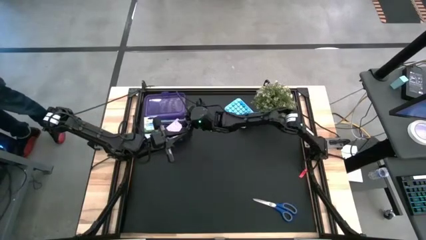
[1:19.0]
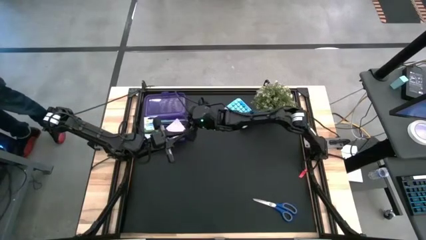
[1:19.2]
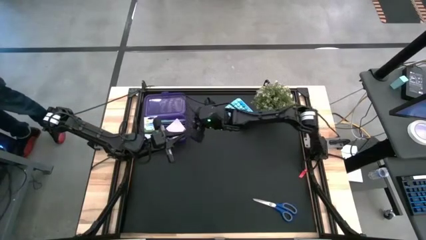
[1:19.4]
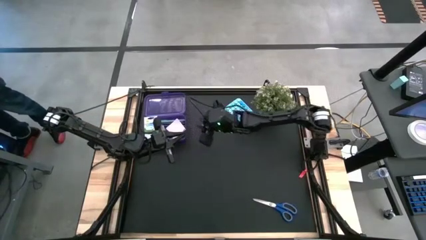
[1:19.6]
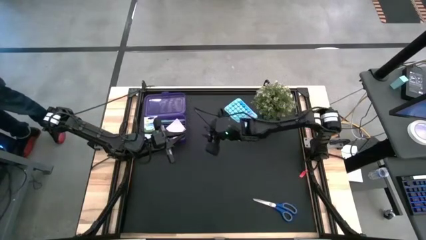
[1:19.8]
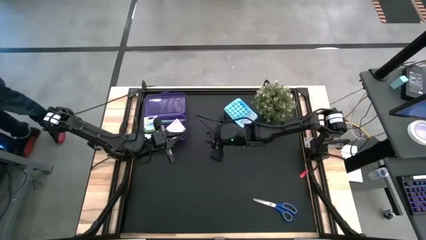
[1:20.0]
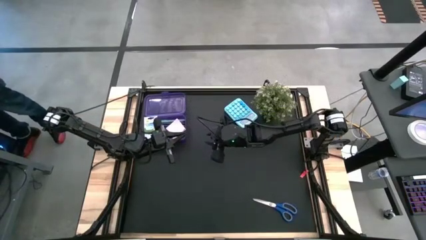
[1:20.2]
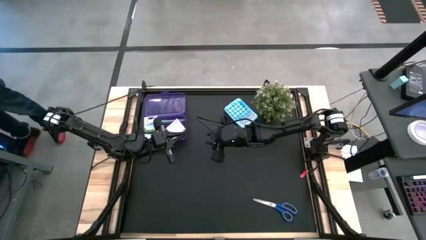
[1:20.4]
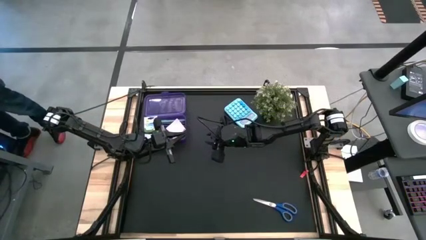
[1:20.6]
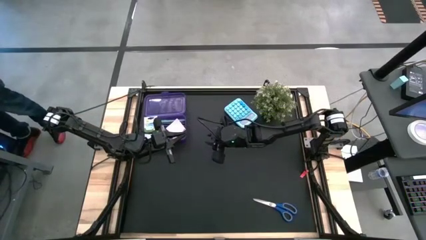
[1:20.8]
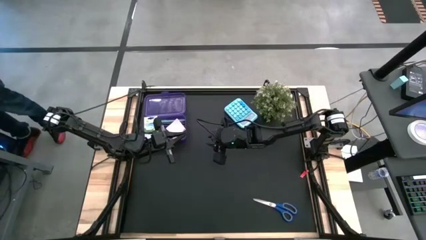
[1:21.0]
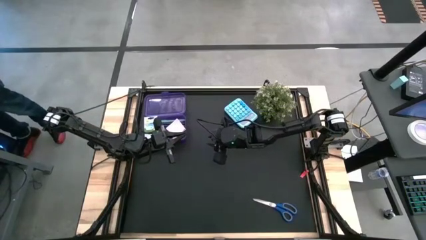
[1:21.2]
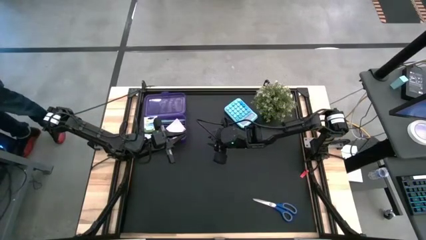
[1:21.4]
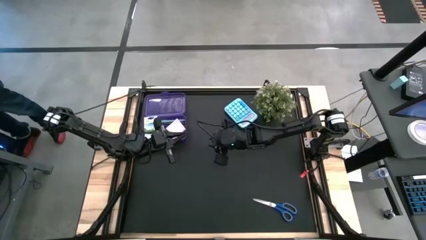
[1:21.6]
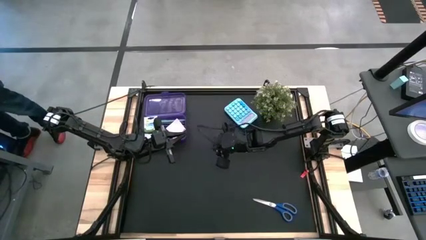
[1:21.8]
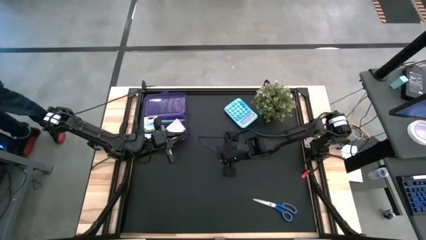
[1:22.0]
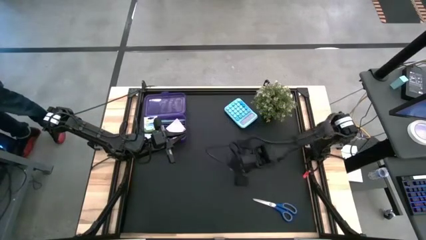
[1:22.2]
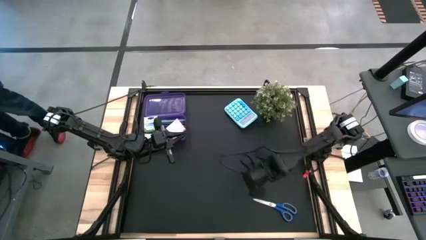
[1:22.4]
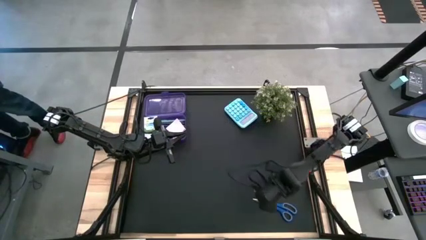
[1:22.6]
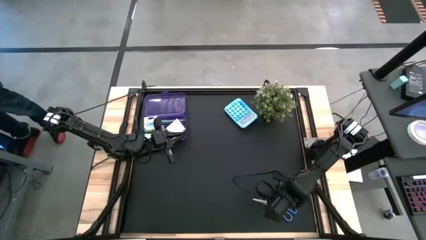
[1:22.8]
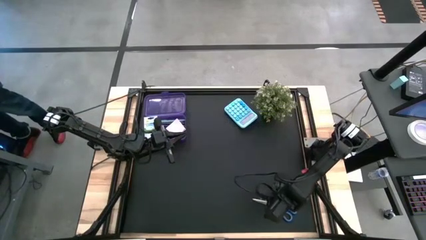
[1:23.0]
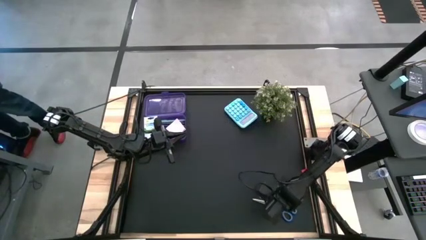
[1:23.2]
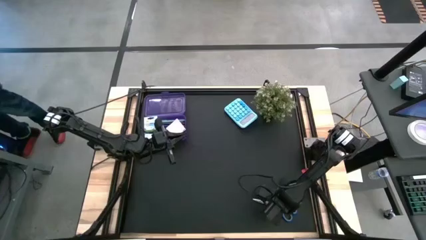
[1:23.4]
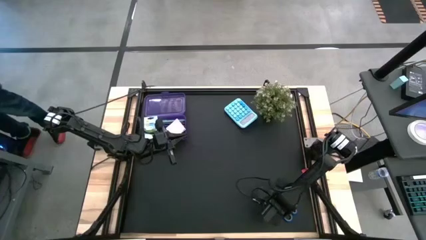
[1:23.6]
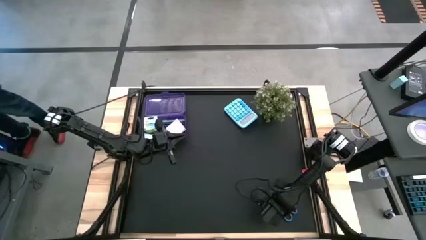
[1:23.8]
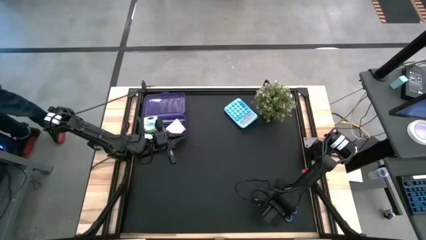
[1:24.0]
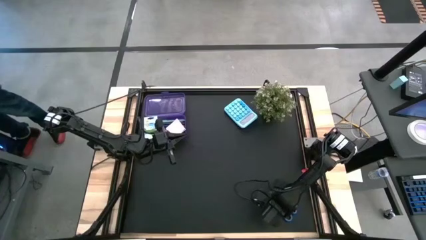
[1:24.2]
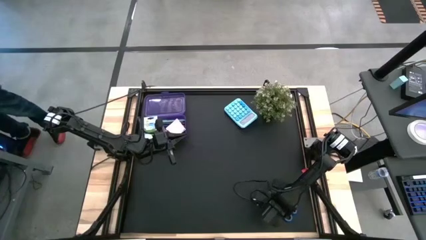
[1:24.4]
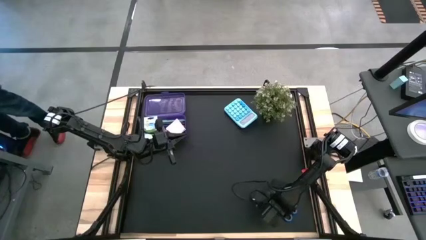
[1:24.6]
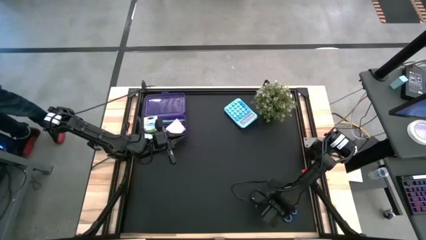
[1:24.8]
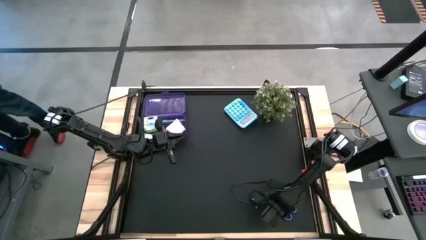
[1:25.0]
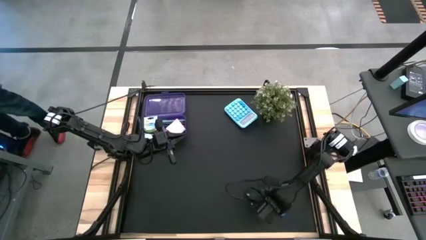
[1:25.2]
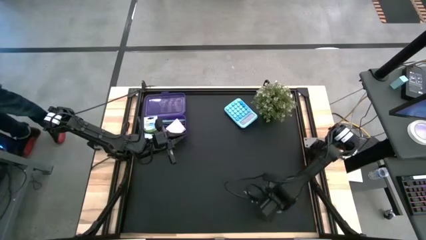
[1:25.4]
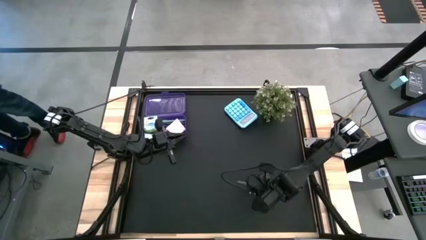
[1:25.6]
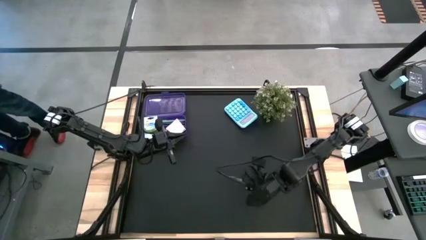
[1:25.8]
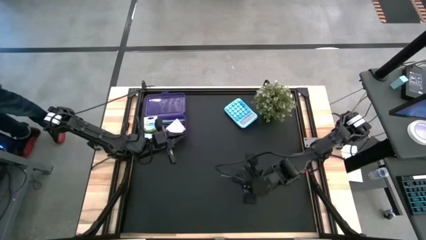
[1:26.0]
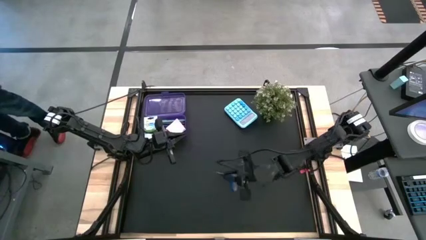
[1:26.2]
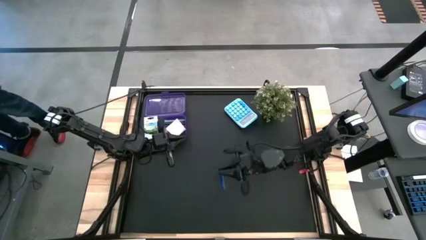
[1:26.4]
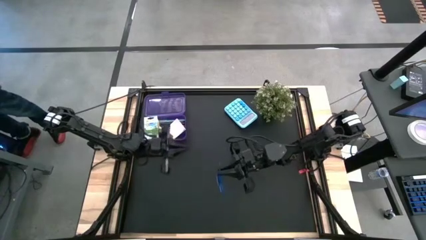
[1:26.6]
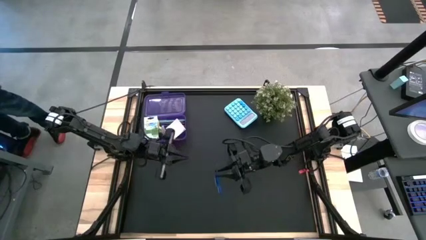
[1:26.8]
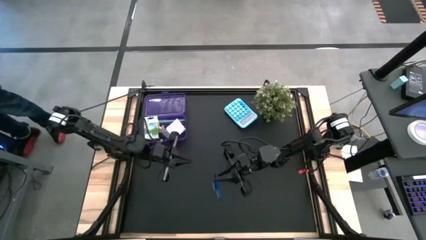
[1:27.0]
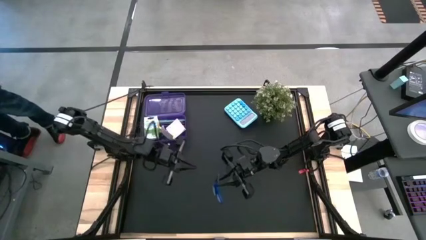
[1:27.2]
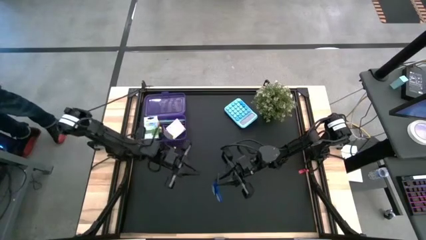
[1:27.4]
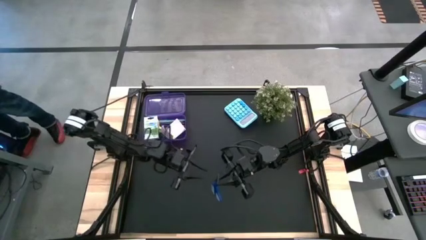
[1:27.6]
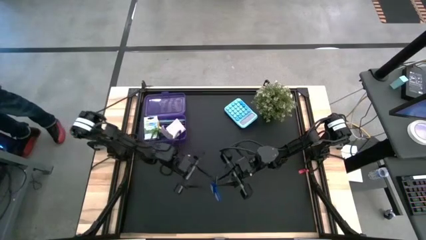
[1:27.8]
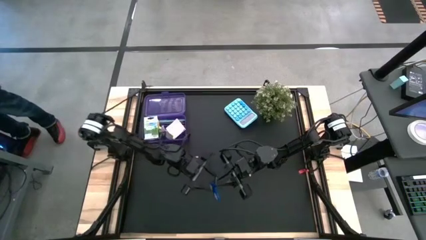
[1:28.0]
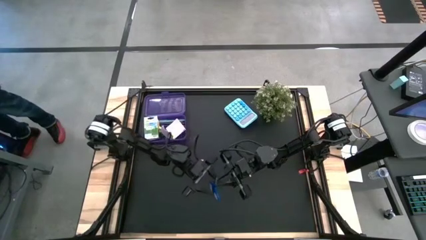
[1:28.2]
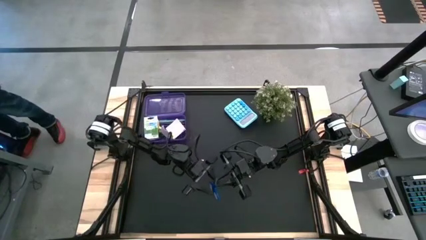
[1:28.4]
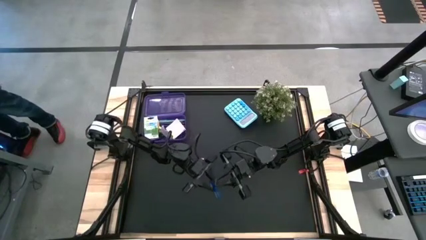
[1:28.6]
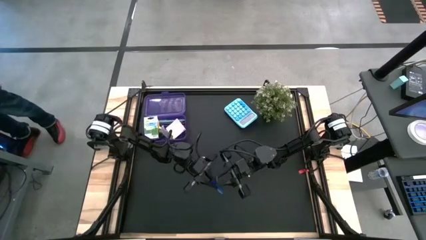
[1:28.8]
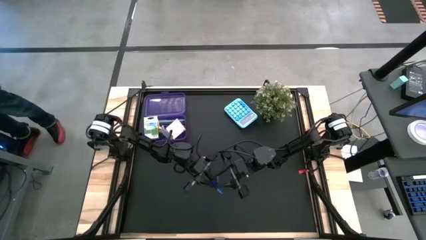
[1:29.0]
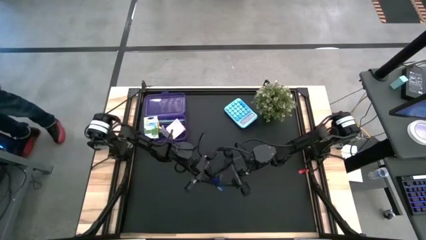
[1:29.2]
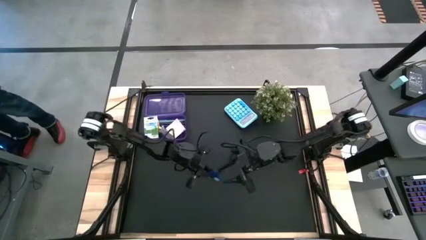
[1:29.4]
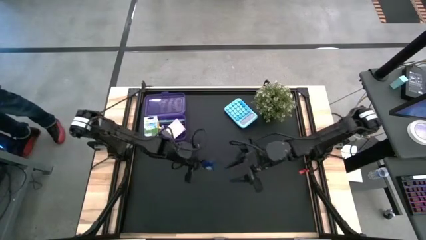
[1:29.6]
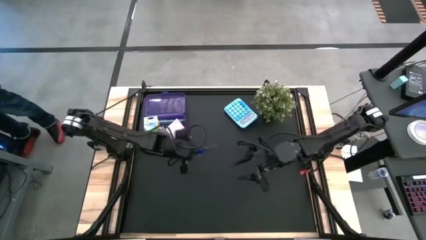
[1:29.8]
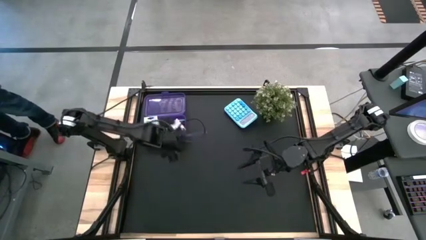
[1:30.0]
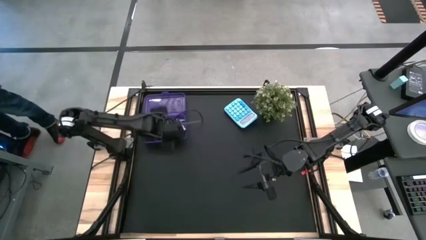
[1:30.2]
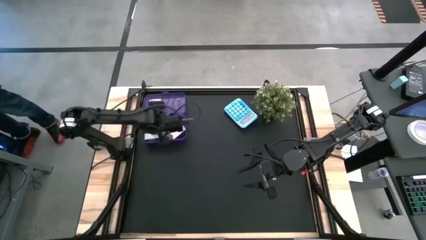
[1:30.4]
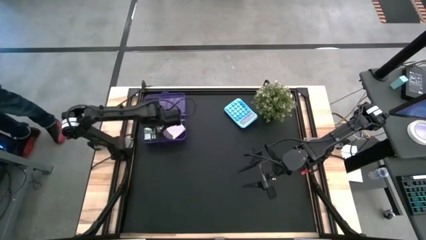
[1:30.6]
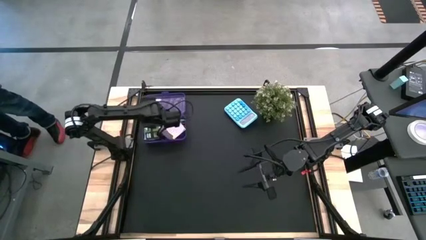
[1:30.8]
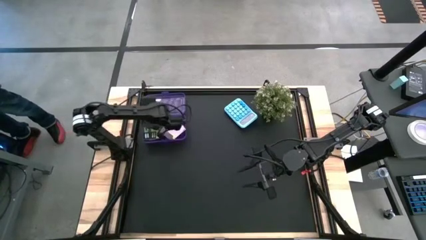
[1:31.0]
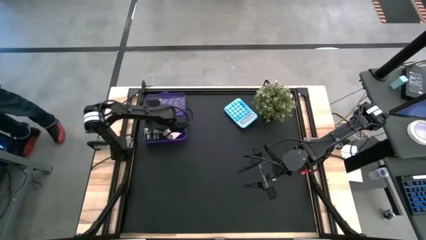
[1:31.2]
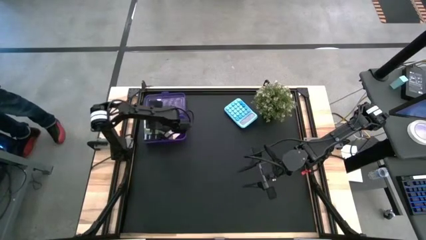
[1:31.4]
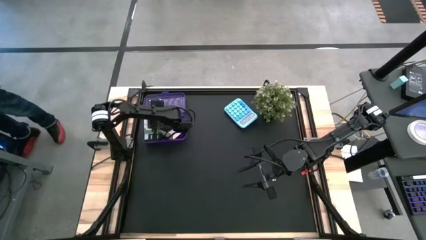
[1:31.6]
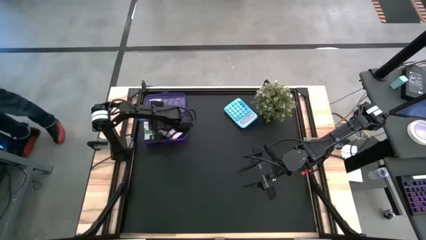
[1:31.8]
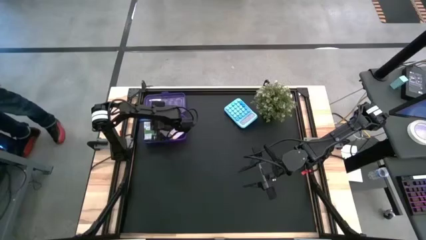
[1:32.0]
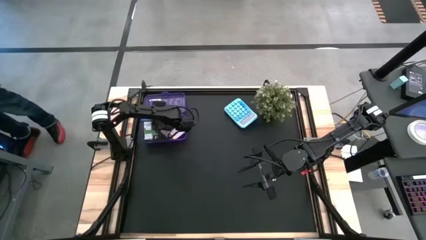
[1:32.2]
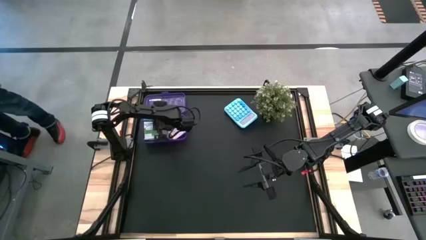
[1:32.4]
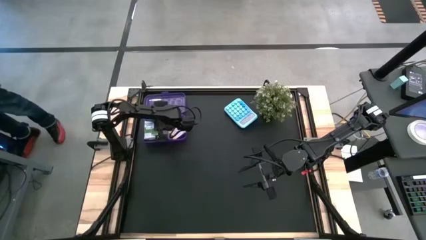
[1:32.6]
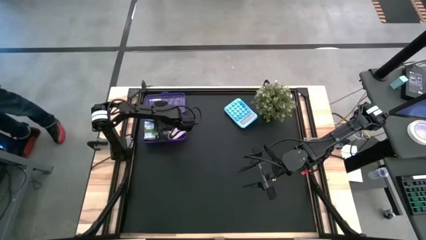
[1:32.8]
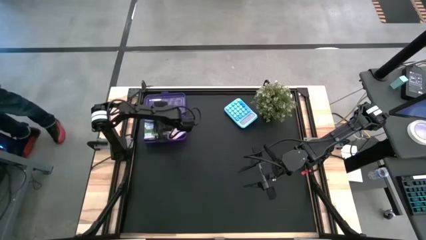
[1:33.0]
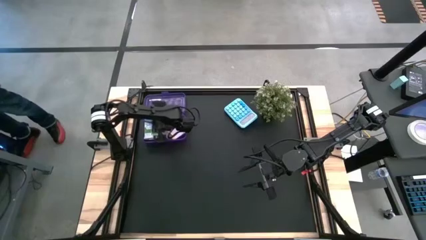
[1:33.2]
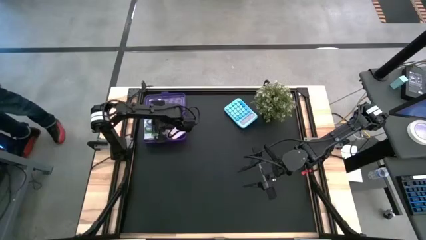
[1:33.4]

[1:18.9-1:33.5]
Task: Pack school essentials
Put the blue scissors into the purple supply box

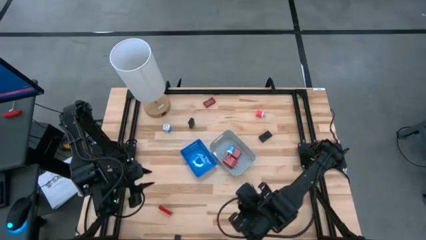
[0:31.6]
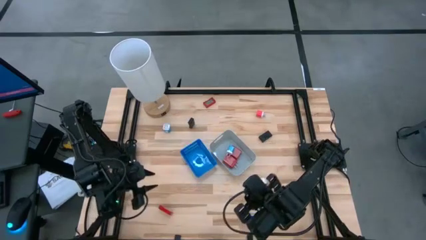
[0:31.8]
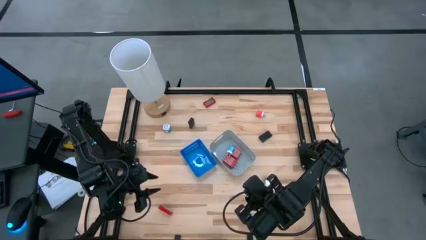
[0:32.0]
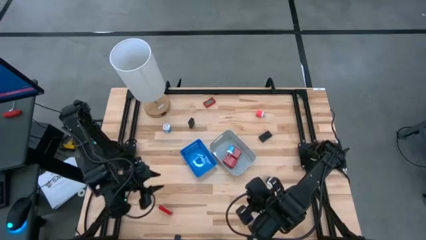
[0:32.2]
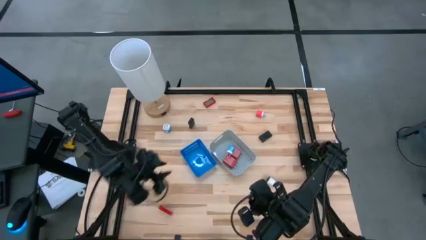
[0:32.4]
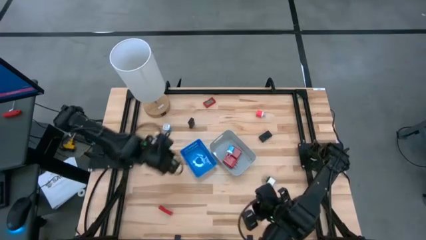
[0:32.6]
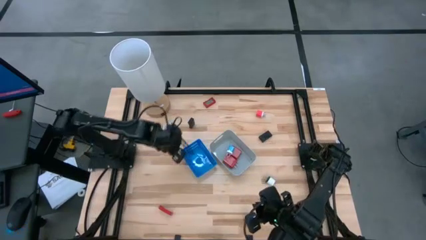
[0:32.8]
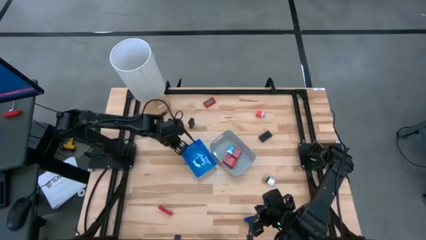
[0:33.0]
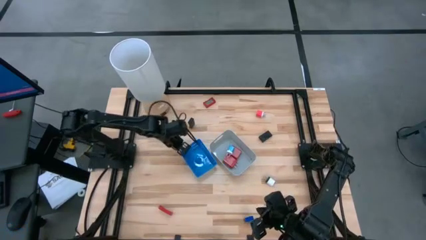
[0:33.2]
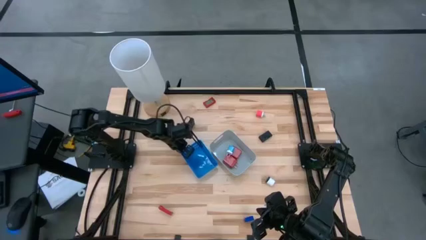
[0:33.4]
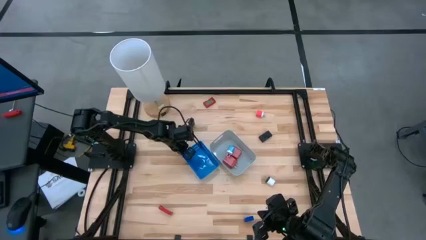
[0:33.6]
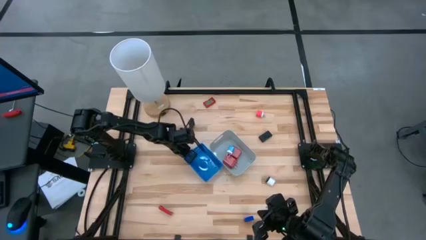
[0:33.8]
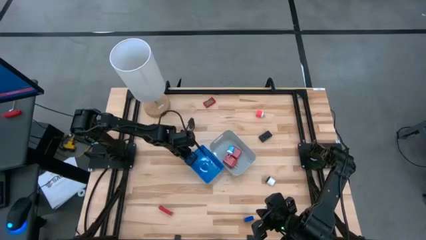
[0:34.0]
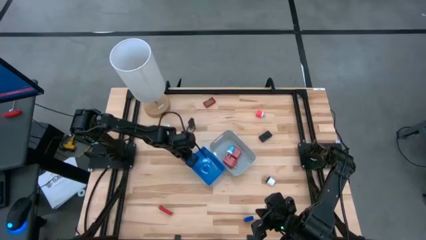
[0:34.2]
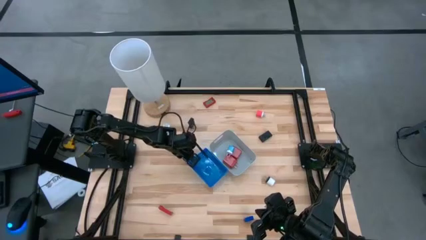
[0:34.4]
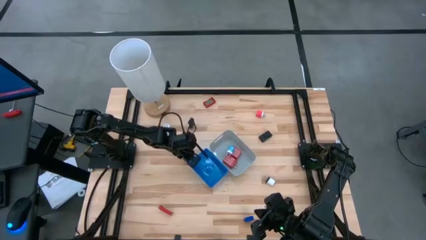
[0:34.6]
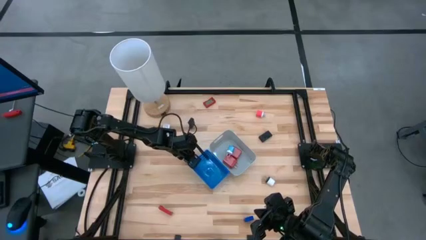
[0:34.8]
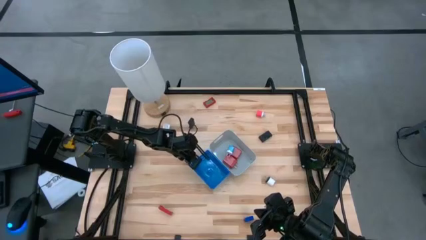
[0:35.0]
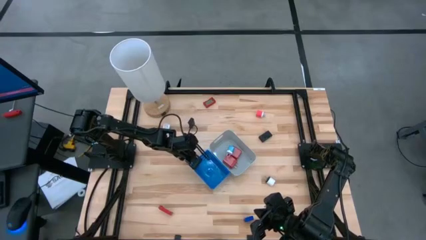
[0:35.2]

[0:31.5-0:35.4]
Task: Pick & Place Office items
Adjust the blue bin
